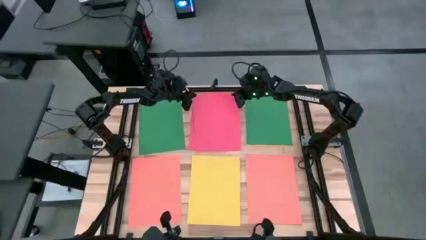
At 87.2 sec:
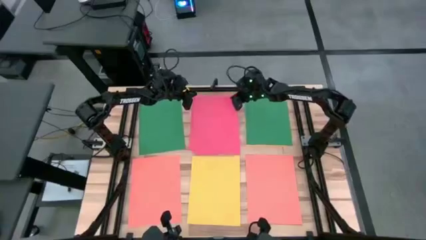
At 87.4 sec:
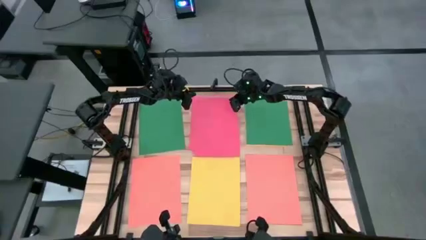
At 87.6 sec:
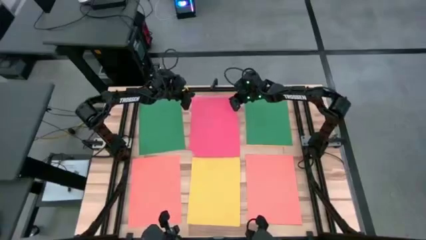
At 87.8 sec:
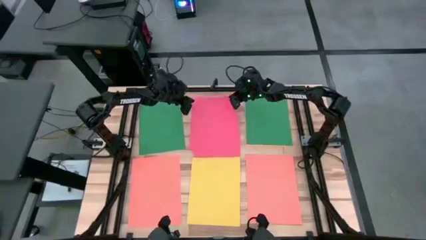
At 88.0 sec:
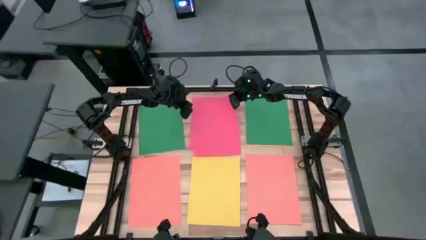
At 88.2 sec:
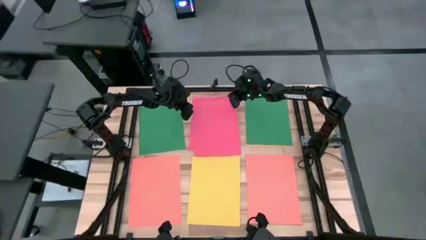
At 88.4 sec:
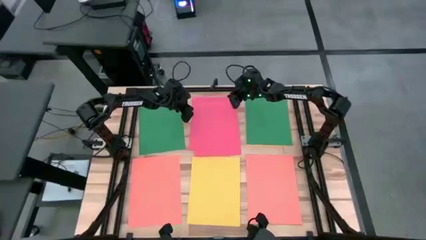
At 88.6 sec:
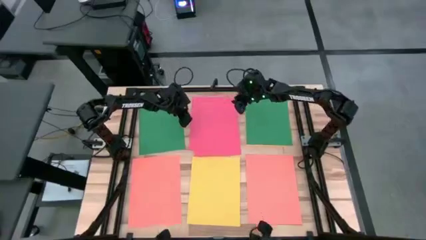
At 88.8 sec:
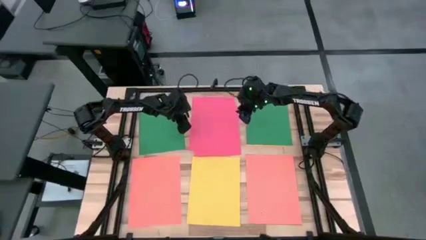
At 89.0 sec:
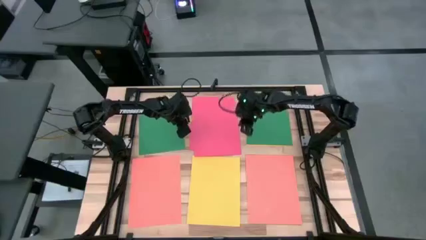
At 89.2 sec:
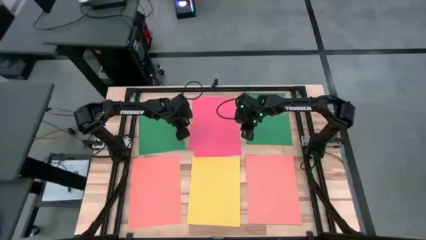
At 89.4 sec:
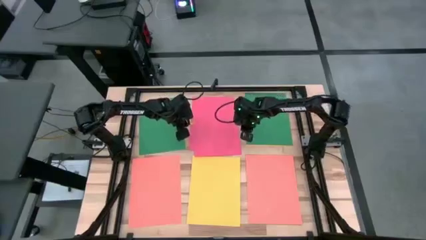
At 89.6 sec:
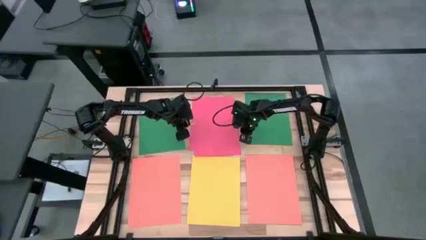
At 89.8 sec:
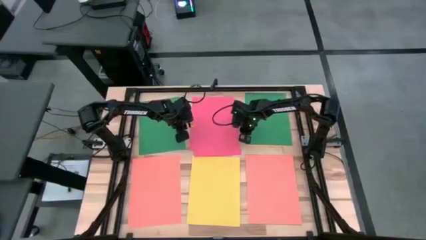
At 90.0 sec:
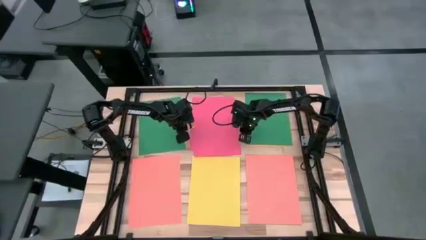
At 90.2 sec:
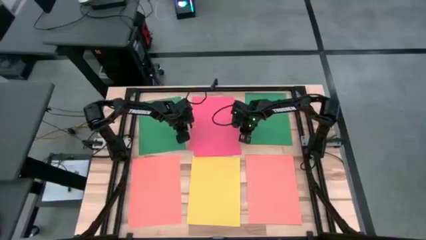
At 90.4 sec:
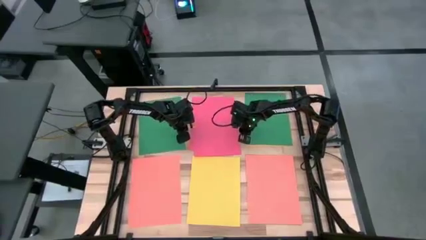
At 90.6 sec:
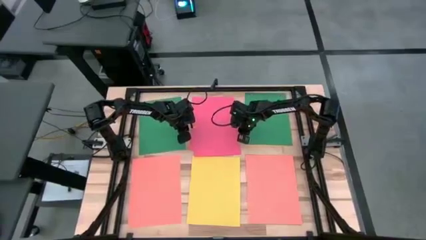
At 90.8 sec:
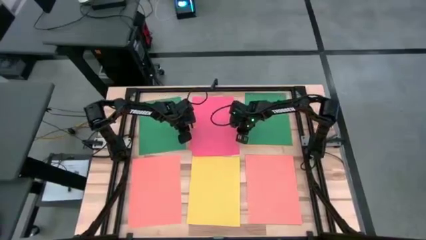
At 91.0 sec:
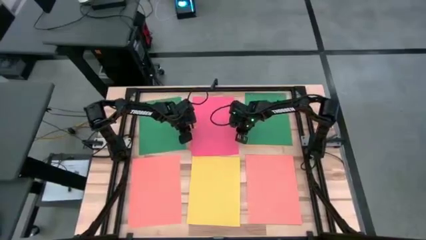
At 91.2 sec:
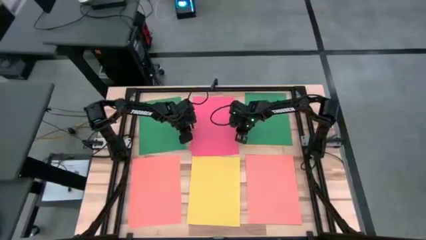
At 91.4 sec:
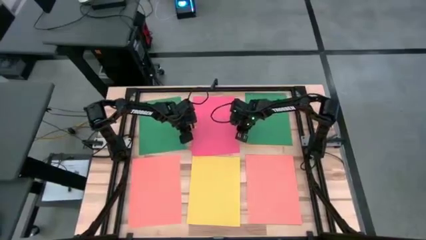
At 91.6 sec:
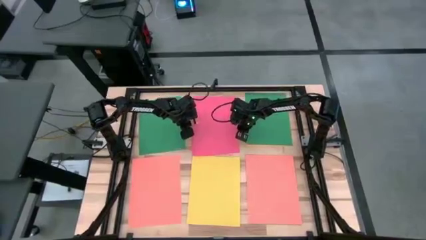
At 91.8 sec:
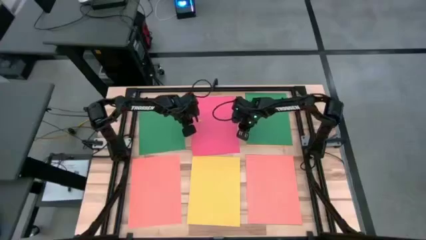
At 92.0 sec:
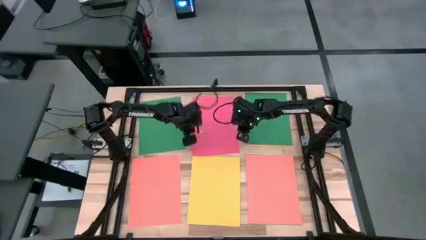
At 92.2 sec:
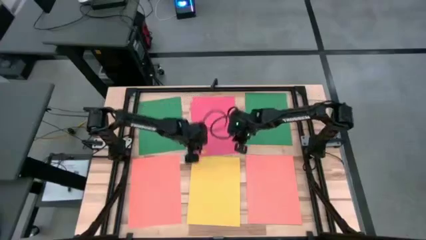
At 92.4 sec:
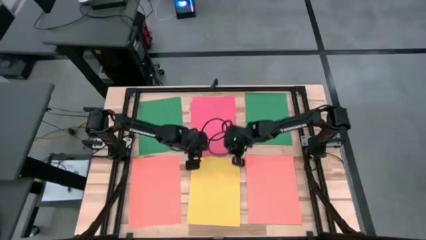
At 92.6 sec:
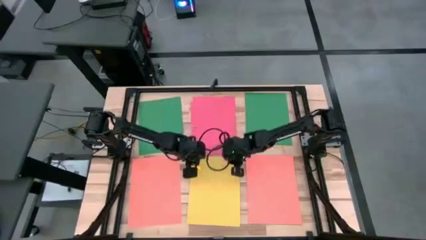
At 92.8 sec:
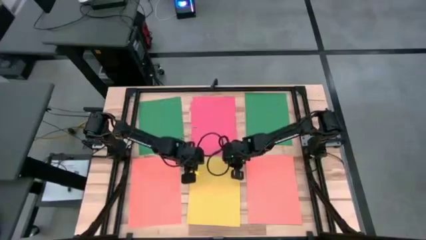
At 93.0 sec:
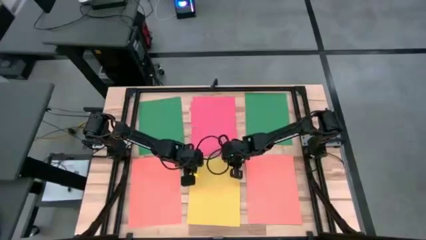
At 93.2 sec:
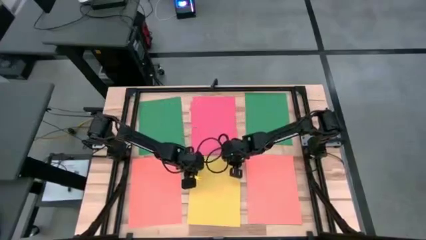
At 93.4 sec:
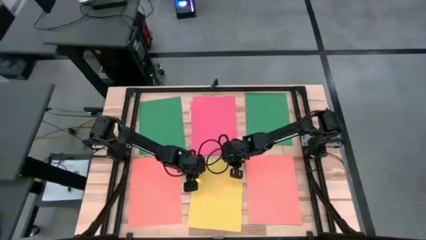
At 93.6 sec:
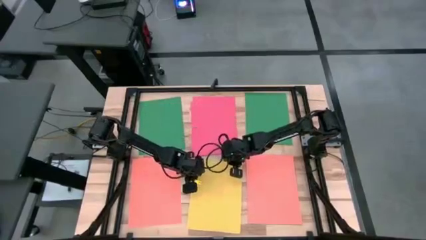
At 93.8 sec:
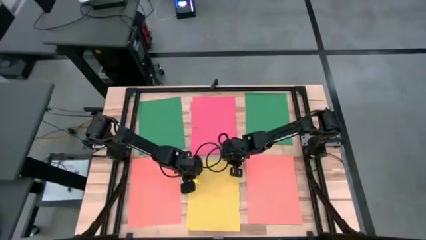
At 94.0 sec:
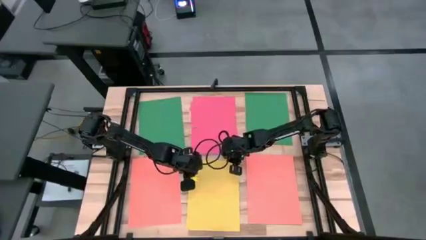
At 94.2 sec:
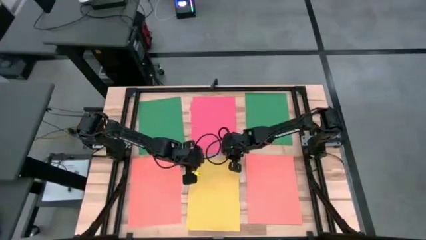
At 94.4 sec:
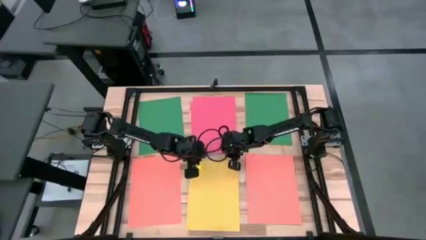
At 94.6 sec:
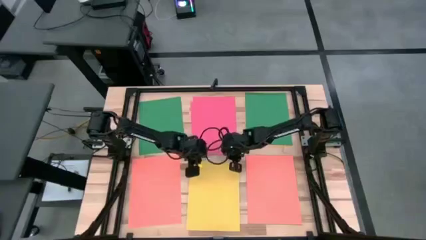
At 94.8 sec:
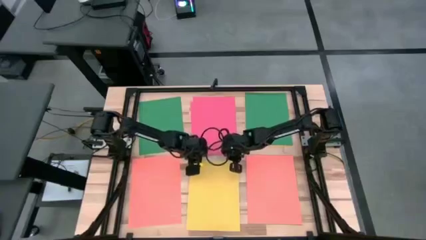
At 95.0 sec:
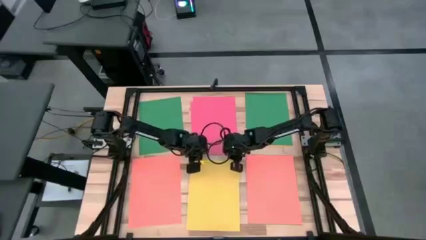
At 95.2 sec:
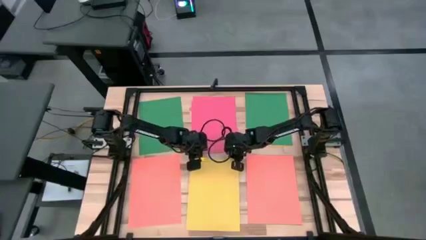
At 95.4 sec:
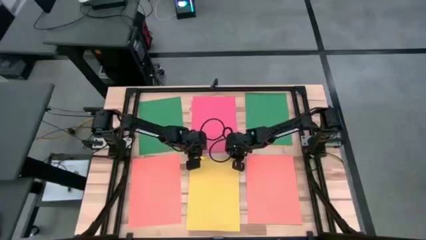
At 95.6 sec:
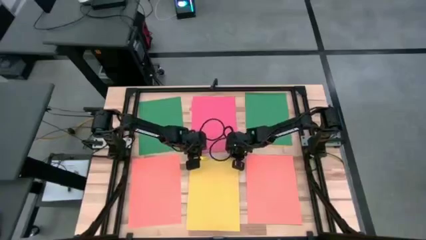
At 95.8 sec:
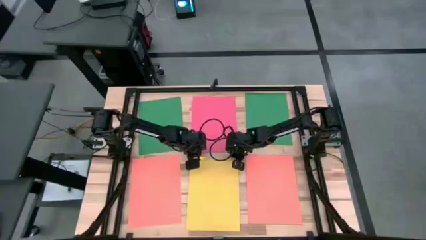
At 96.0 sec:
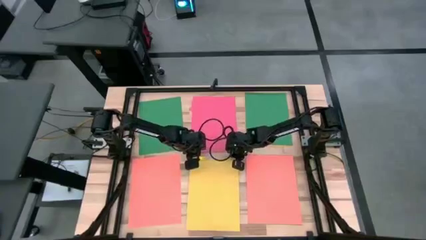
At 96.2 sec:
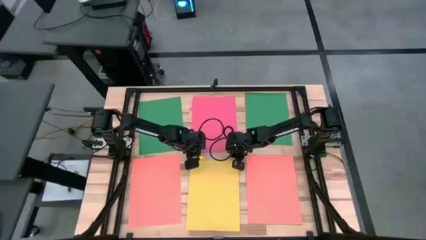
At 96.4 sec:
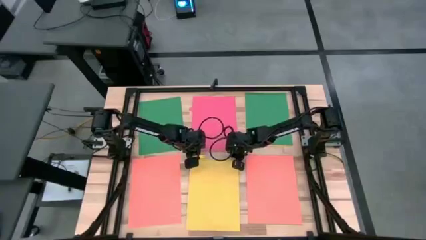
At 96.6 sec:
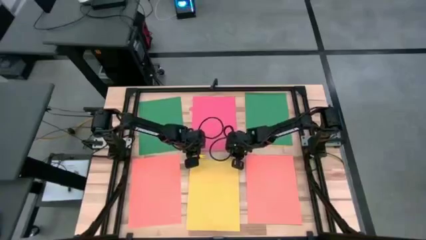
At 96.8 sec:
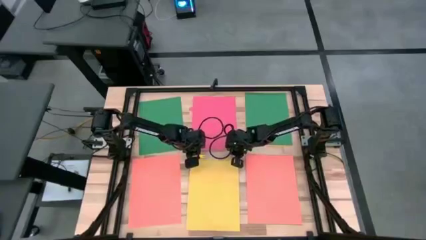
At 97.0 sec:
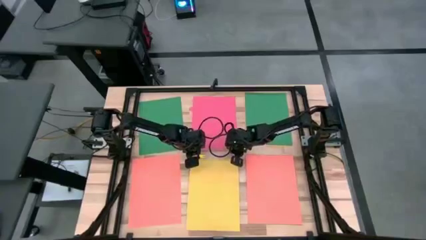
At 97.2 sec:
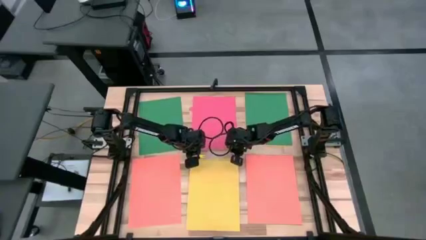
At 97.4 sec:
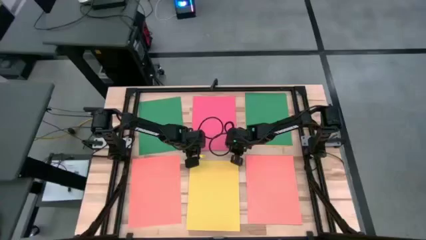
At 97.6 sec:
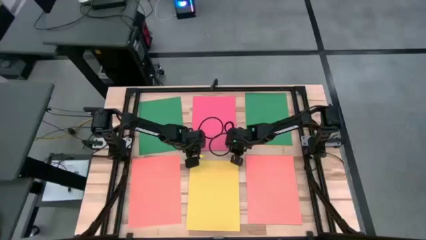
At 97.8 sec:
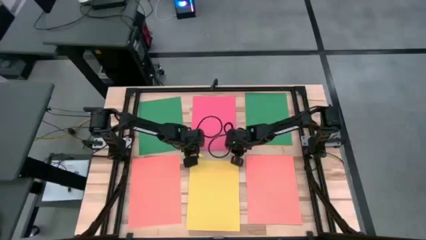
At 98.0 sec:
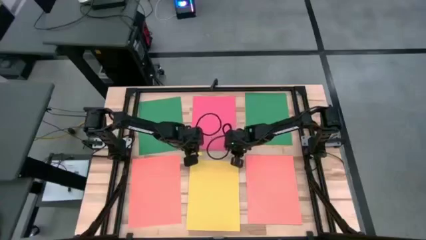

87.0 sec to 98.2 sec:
Task: Organize paper
Stack the pink paper on top of the pink paper
